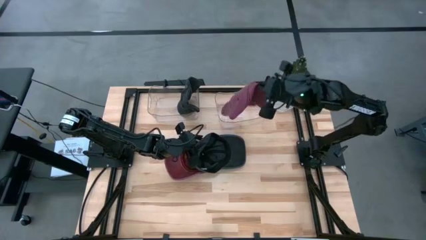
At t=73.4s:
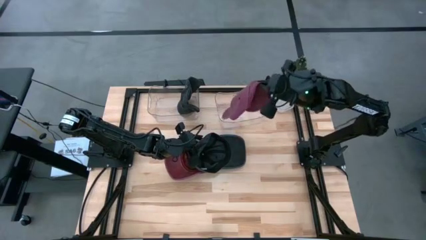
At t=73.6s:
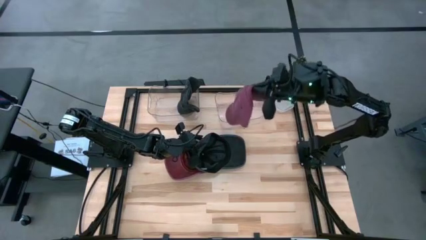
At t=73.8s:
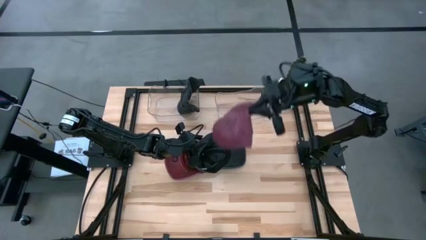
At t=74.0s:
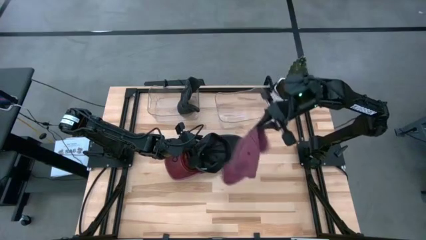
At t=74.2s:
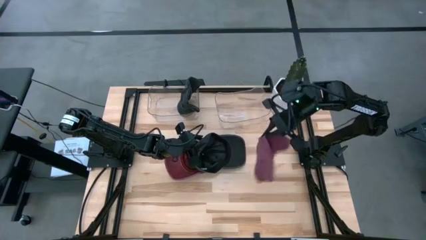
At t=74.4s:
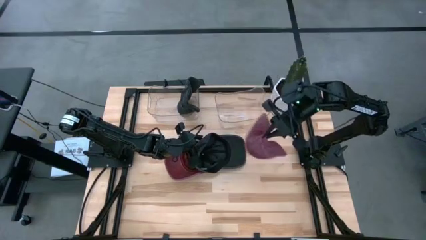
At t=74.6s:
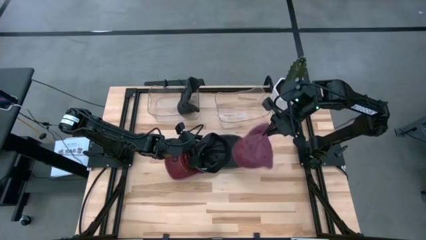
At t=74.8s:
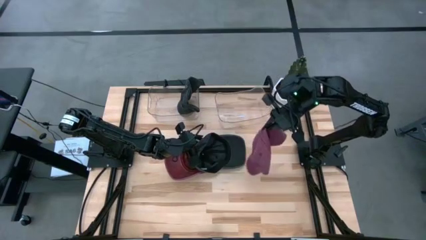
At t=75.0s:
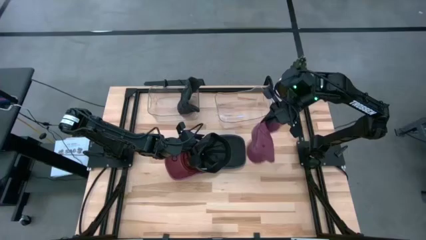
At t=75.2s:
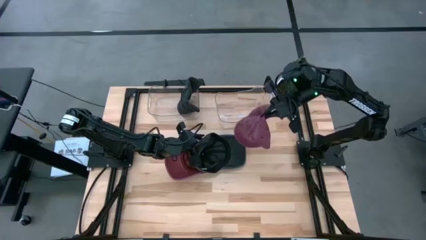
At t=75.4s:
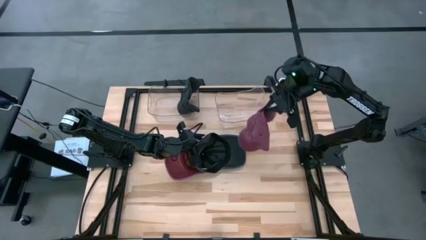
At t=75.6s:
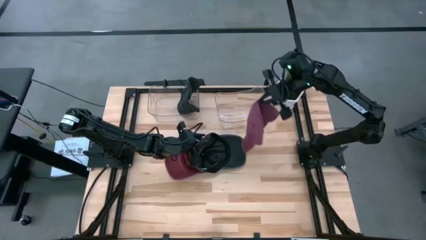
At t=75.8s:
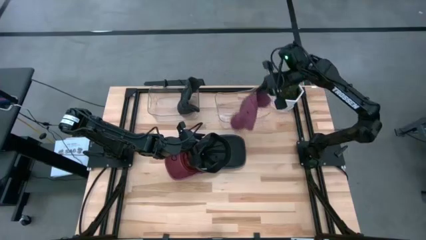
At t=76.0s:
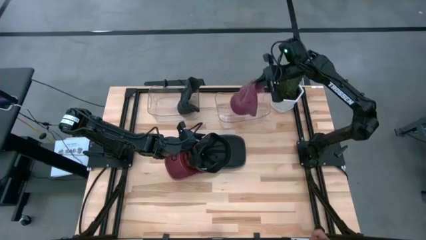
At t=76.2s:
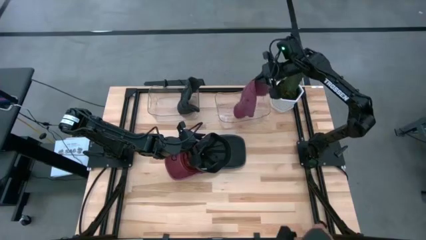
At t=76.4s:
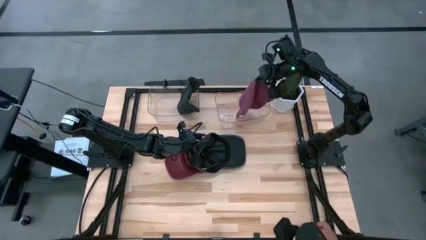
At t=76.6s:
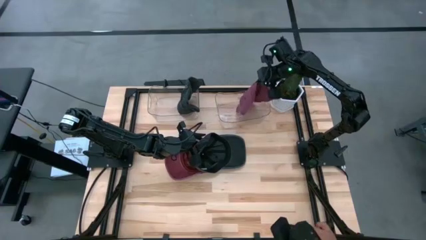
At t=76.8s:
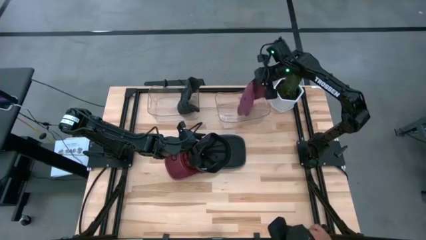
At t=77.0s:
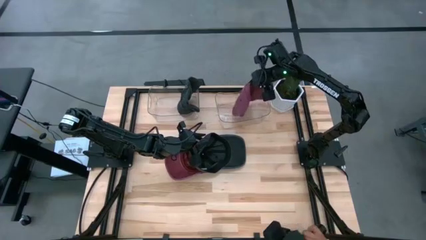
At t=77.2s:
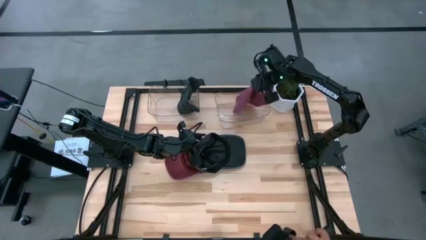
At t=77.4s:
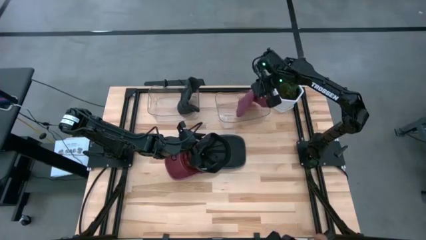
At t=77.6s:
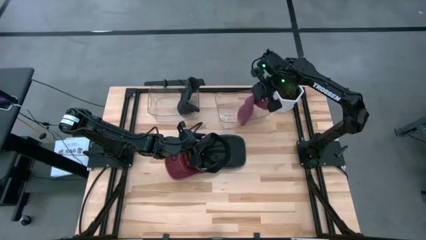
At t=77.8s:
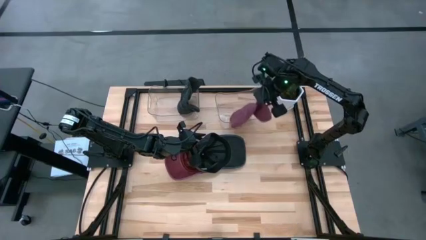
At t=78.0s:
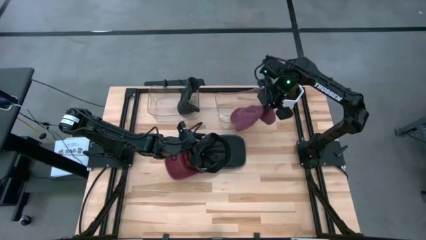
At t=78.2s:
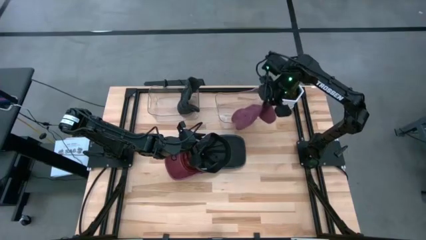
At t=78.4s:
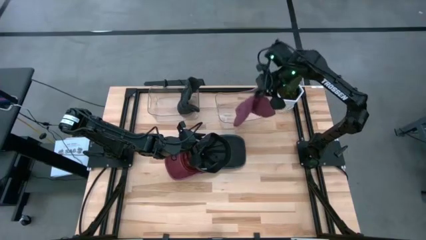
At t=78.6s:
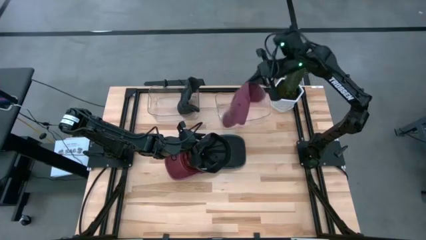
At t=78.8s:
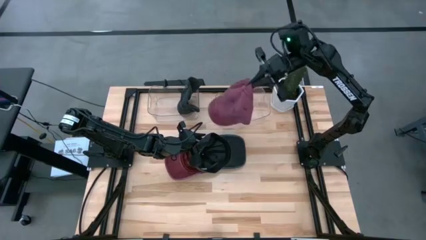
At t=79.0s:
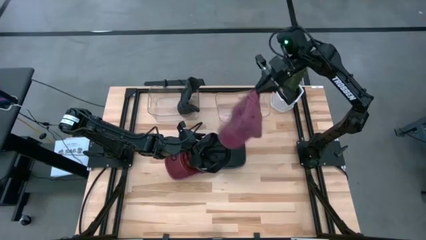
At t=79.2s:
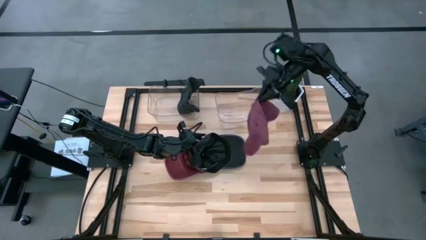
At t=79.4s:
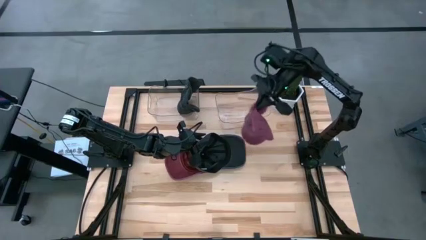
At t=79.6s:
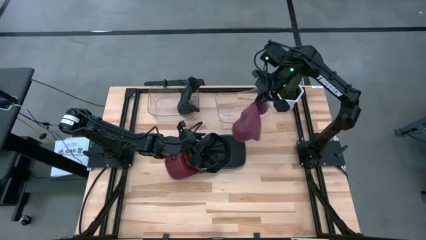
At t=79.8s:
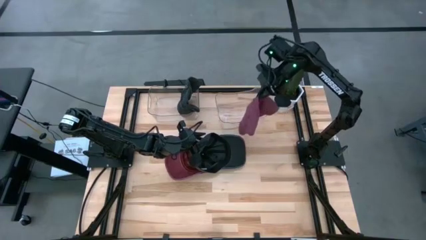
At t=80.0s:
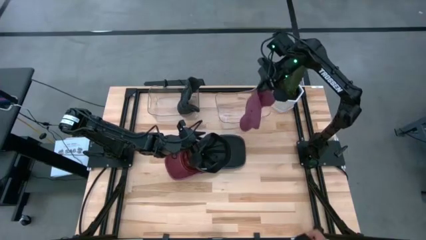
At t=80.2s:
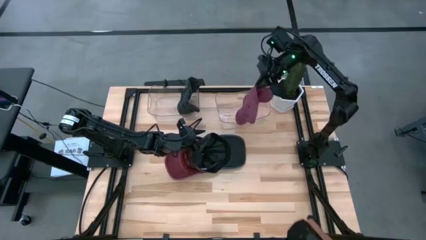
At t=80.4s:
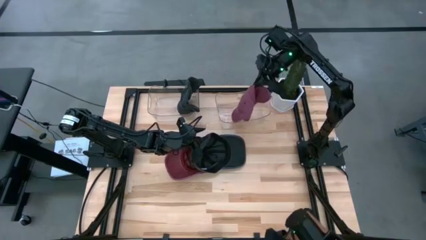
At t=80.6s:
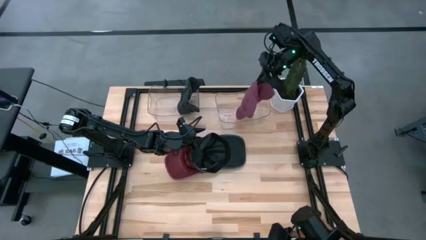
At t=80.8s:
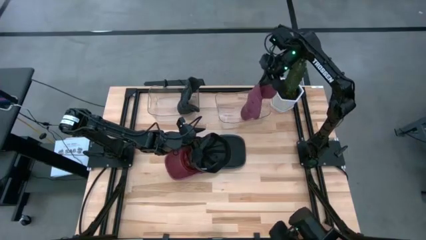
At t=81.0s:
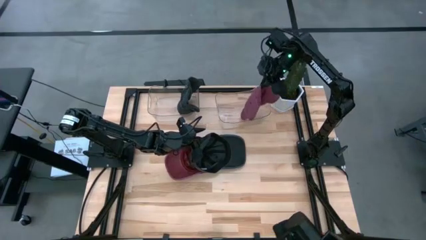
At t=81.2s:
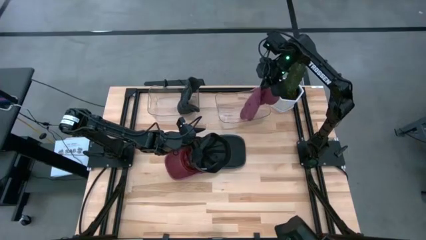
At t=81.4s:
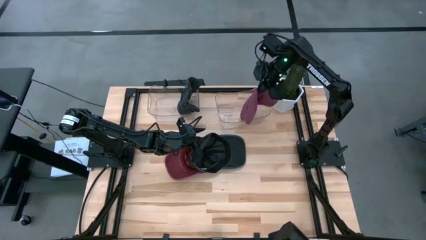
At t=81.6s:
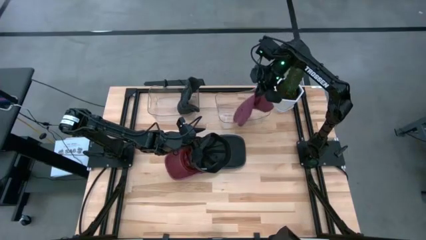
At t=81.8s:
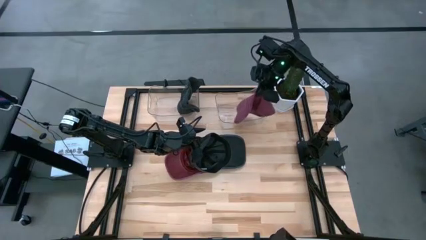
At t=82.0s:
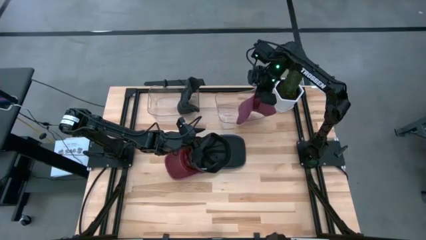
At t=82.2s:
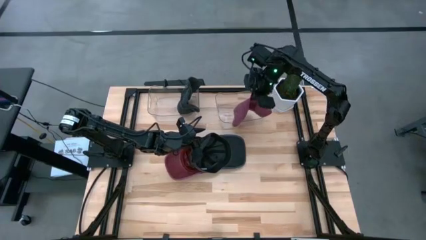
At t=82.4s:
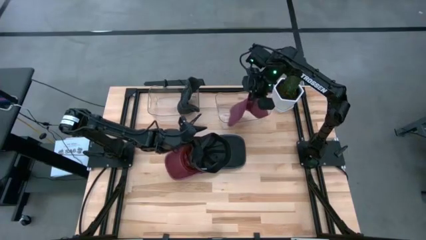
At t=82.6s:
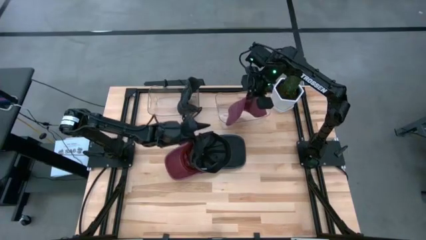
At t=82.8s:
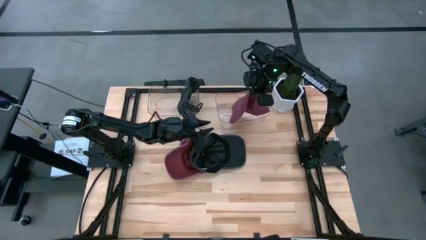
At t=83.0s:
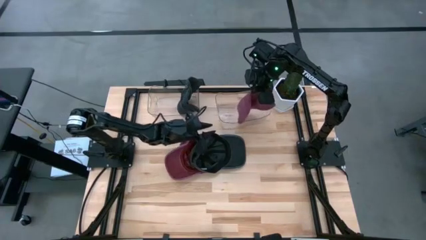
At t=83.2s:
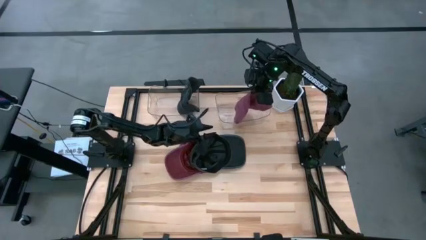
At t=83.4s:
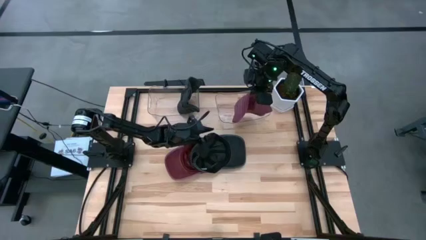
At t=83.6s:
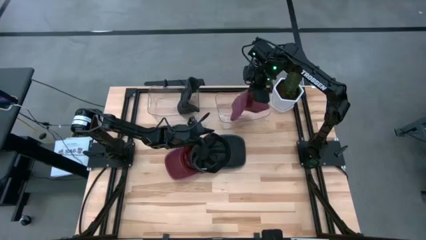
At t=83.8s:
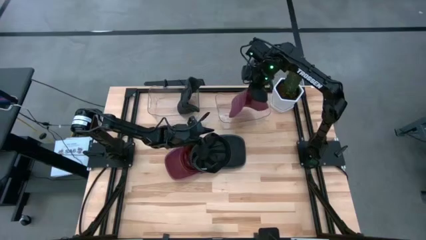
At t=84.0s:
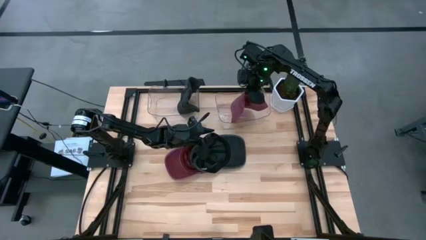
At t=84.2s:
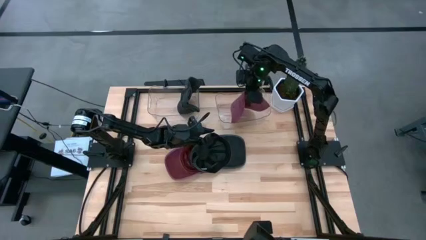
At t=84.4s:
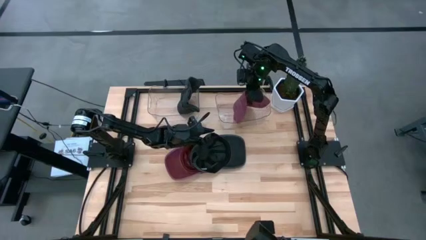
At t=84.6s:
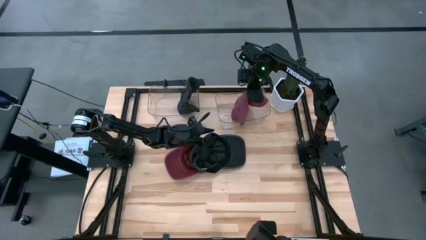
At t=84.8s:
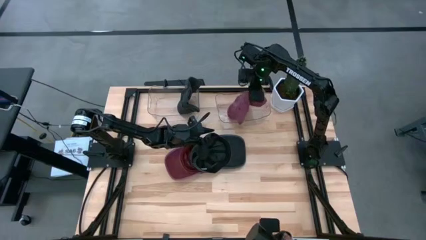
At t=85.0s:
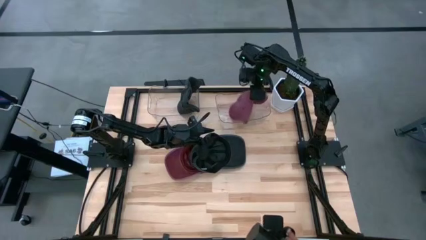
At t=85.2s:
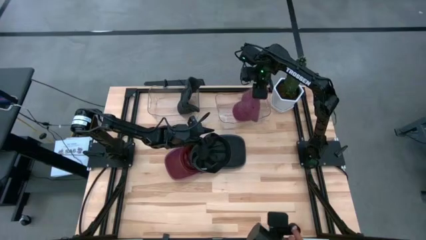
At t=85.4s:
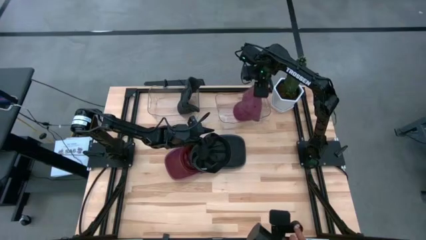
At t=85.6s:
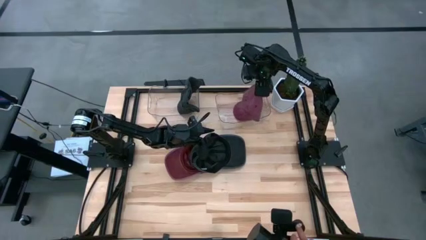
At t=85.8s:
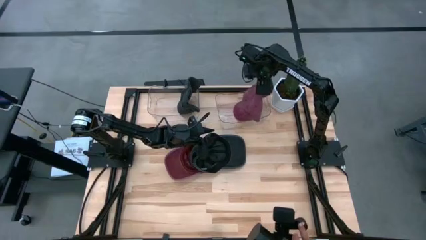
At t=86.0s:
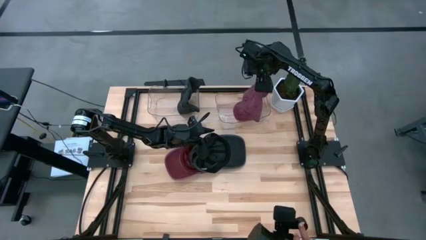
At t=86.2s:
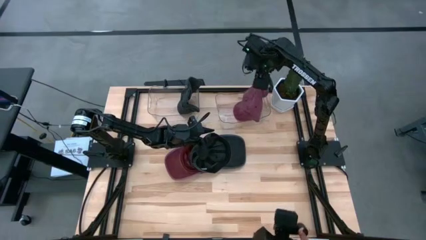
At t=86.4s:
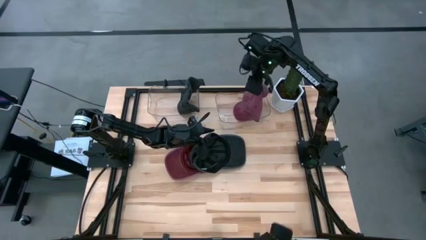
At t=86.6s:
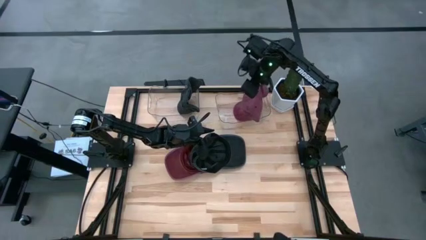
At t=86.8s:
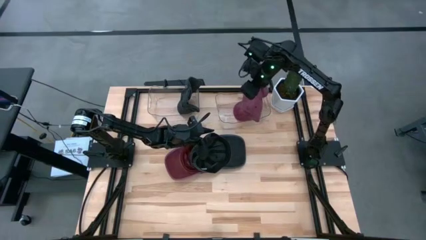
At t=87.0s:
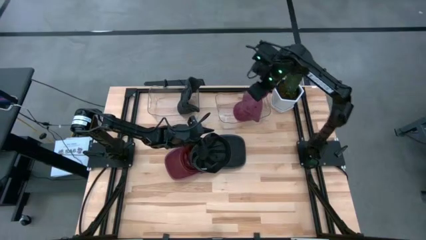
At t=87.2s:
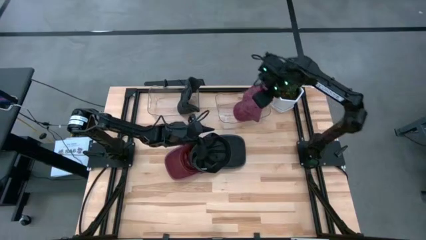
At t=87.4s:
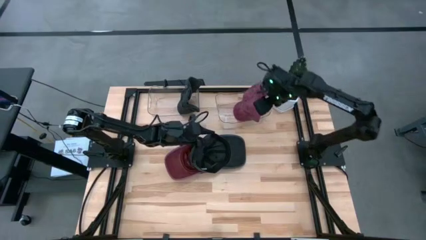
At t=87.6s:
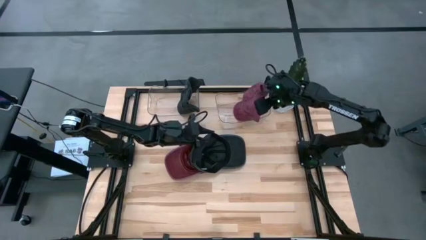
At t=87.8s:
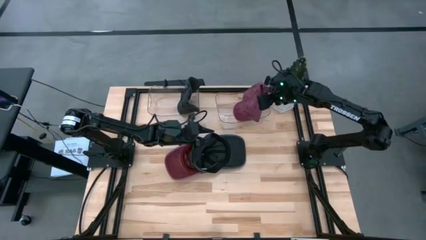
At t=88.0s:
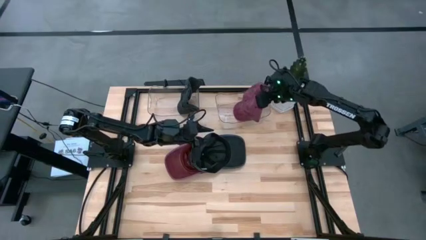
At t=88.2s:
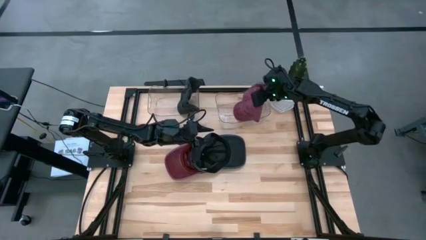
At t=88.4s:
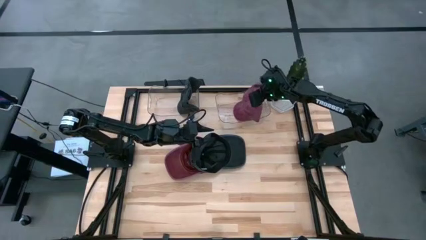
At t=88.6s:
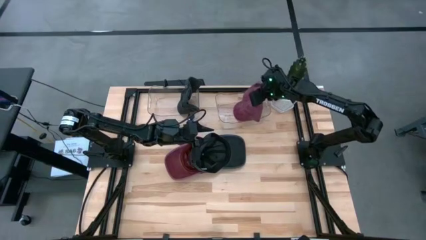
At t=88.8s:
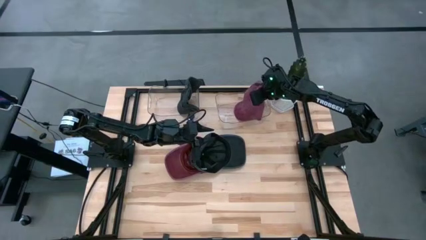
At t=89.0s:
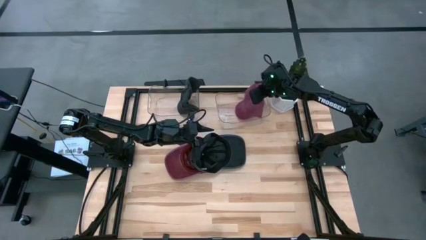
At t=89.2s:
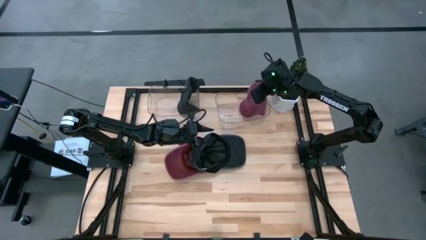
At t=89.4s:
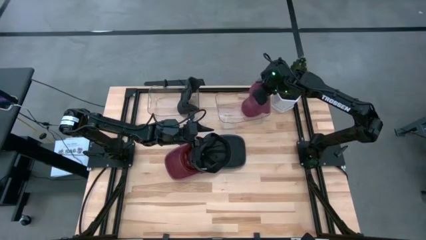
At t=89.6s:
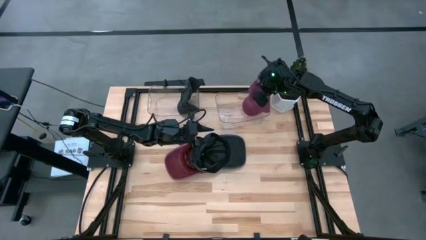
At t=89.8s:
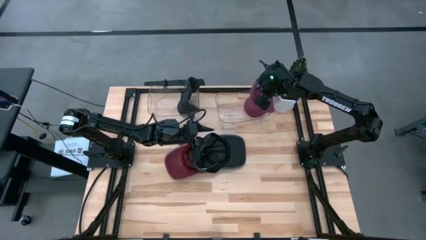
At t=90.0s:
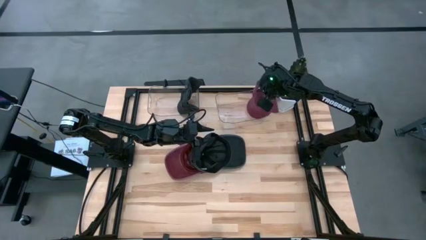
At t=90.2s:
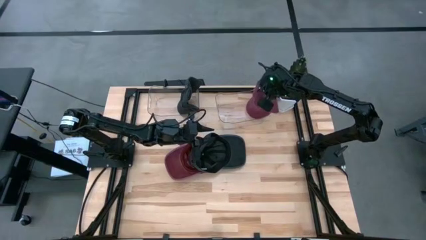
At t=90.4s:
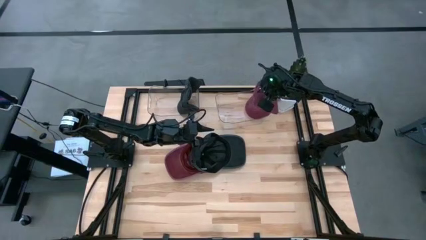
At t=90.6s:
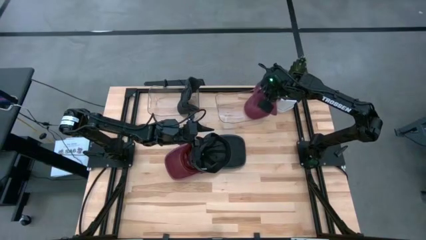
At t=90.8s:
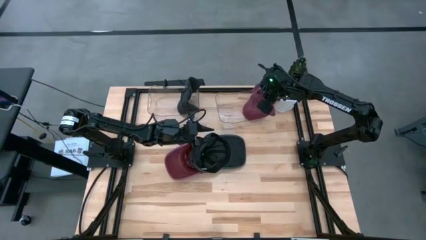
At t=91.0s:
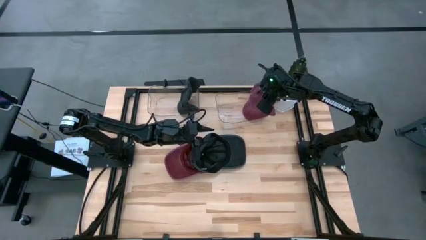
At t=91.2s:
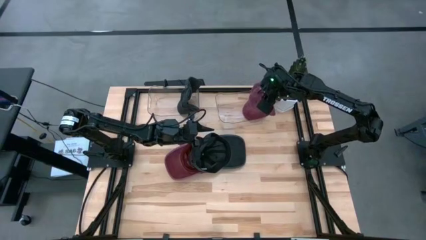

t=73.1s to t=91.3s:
Task: Pick & Place hat
Put the red cap into the right transparent bin
